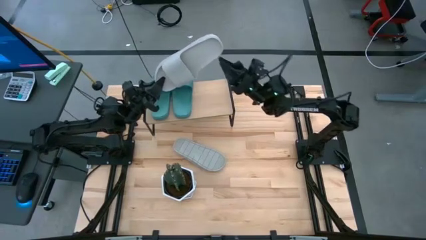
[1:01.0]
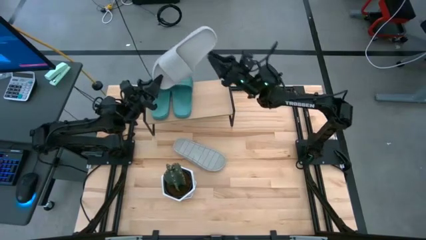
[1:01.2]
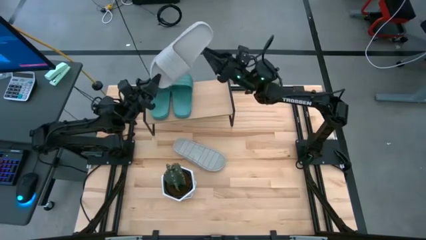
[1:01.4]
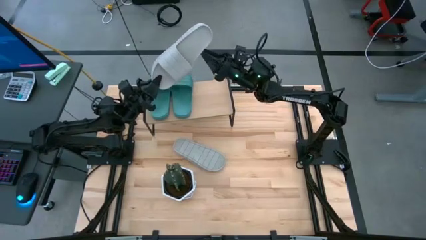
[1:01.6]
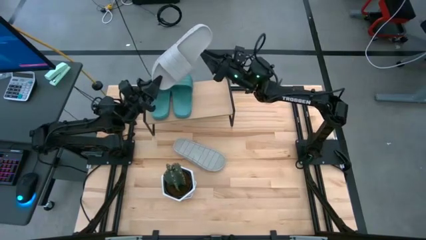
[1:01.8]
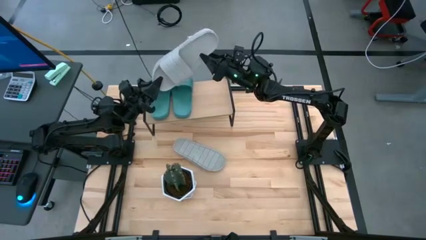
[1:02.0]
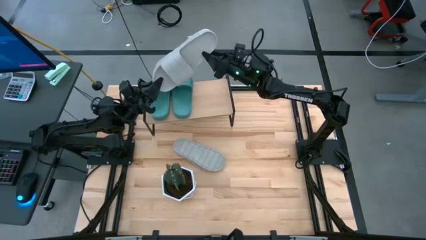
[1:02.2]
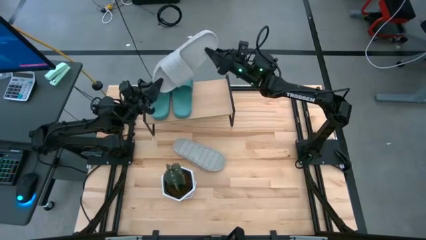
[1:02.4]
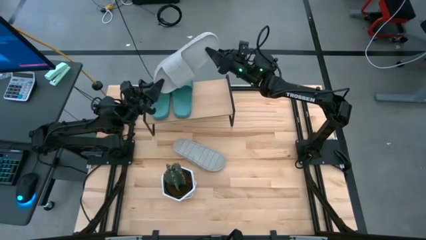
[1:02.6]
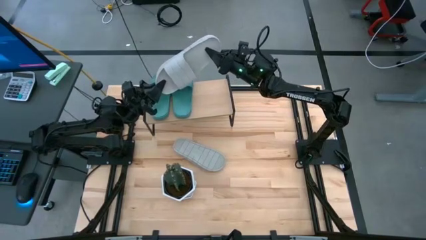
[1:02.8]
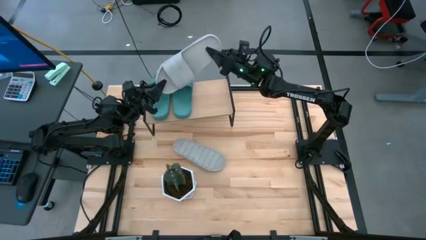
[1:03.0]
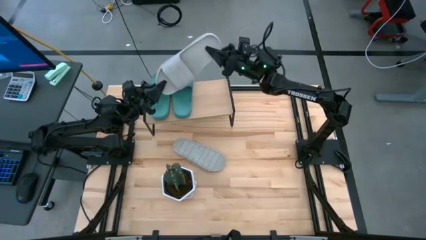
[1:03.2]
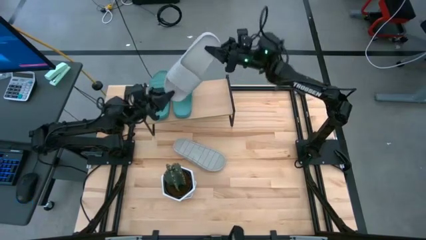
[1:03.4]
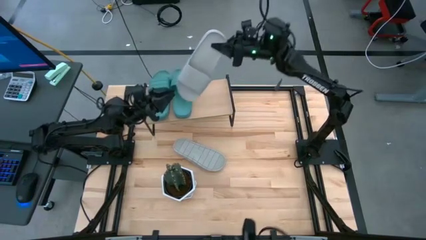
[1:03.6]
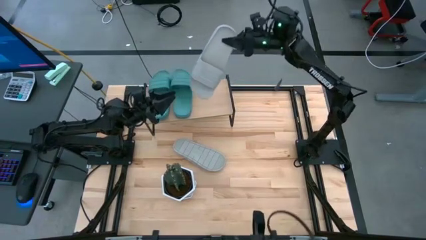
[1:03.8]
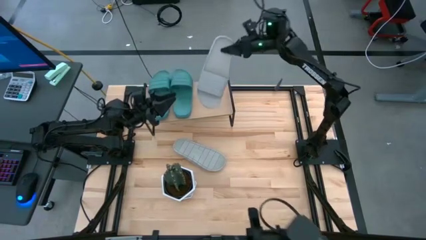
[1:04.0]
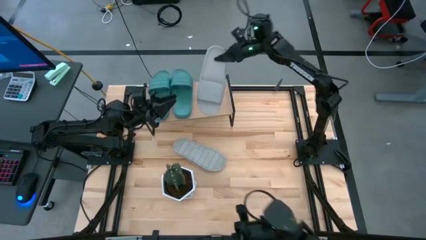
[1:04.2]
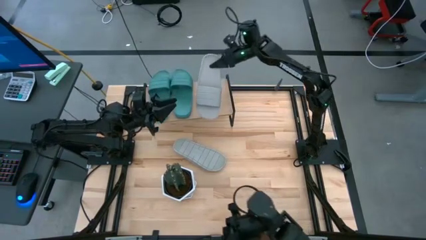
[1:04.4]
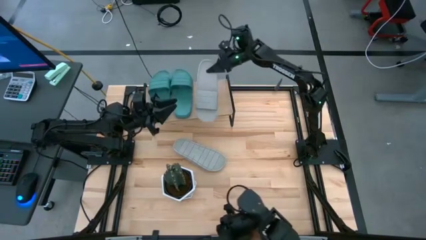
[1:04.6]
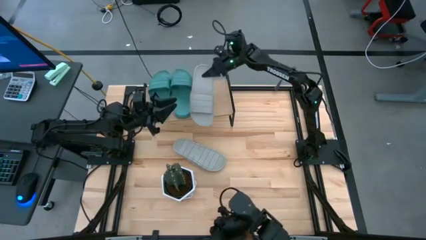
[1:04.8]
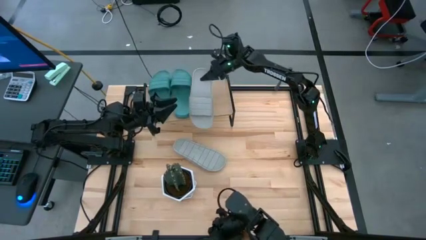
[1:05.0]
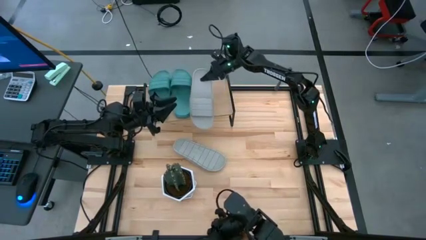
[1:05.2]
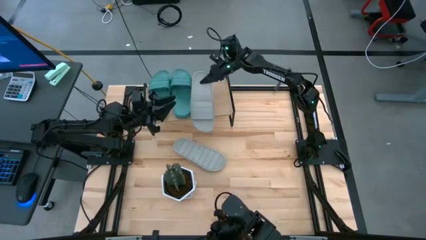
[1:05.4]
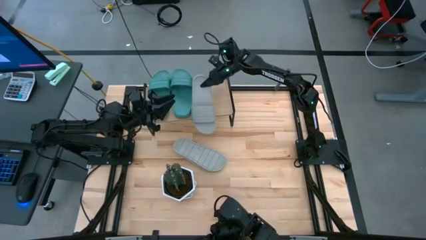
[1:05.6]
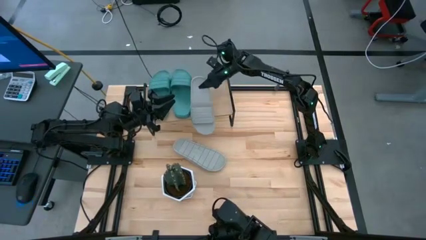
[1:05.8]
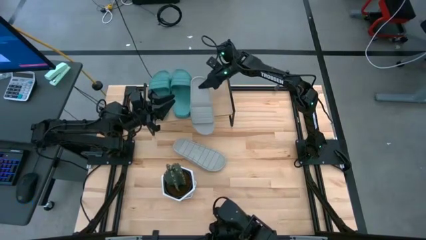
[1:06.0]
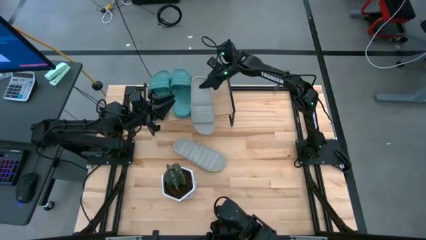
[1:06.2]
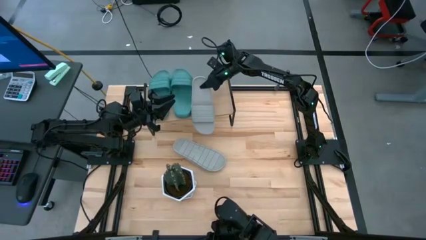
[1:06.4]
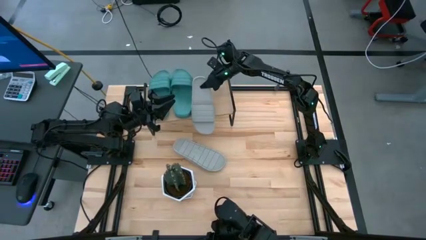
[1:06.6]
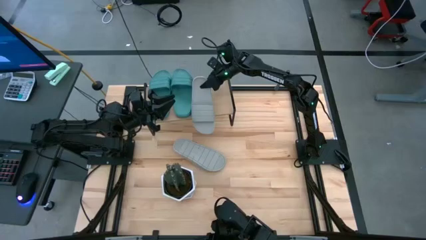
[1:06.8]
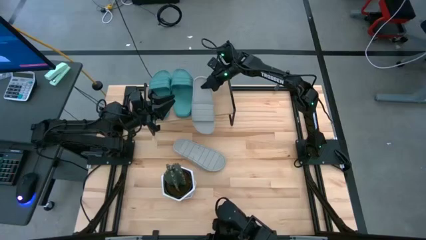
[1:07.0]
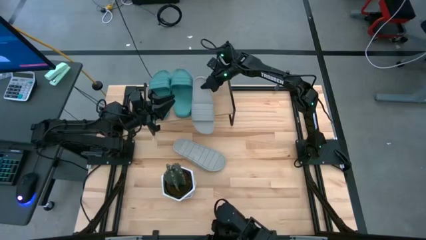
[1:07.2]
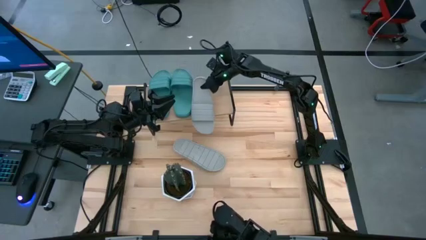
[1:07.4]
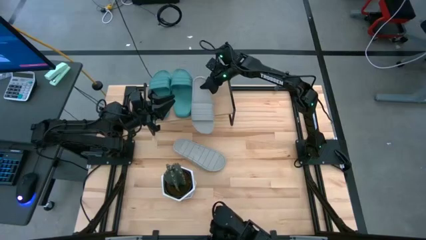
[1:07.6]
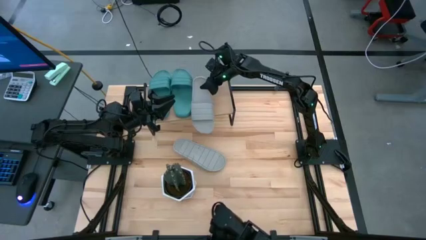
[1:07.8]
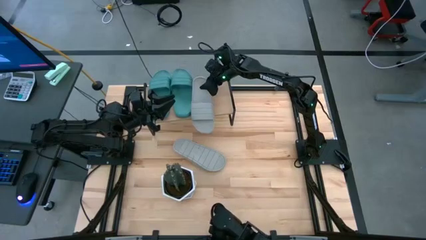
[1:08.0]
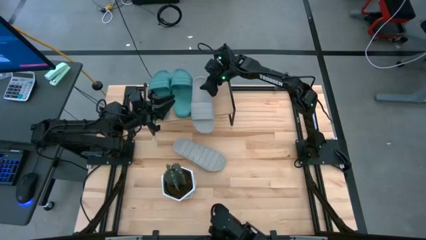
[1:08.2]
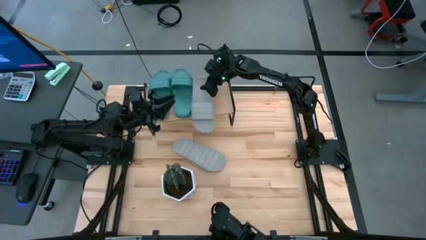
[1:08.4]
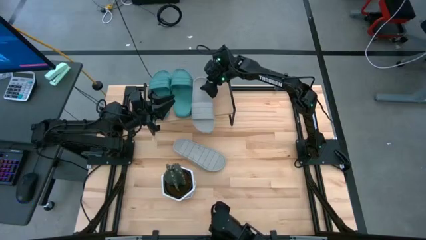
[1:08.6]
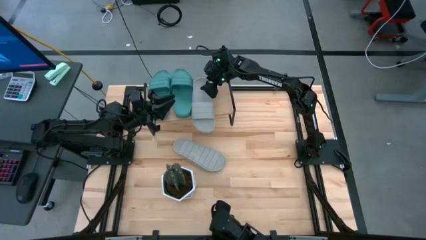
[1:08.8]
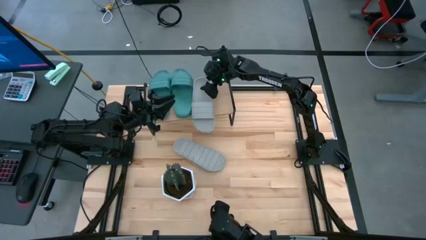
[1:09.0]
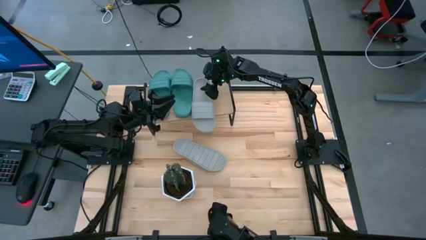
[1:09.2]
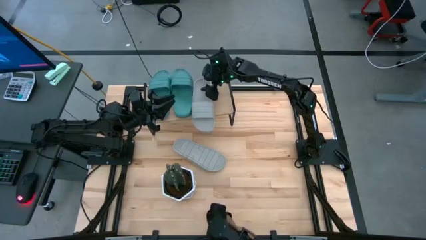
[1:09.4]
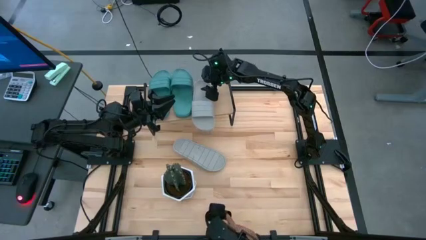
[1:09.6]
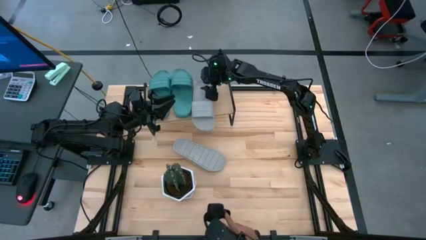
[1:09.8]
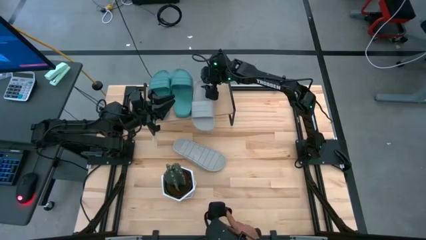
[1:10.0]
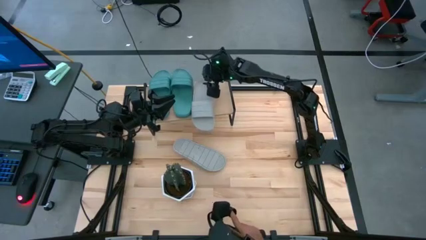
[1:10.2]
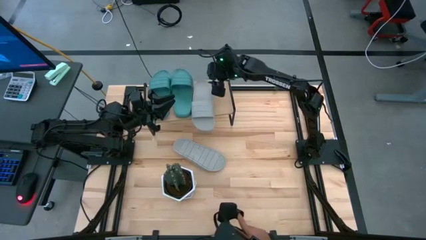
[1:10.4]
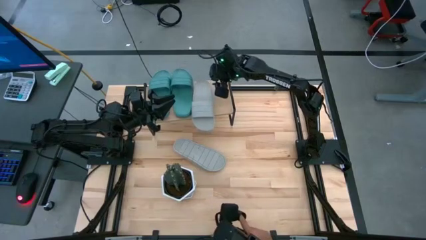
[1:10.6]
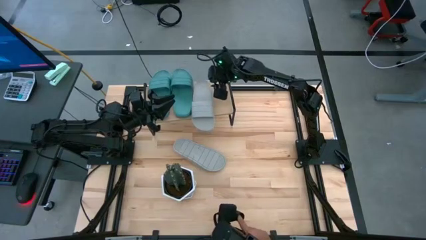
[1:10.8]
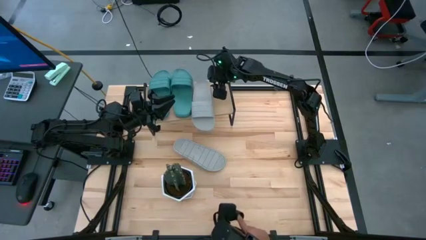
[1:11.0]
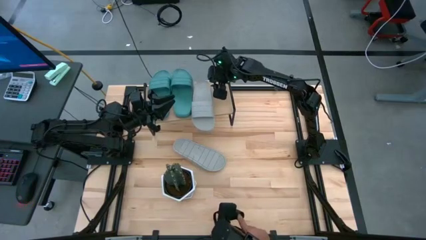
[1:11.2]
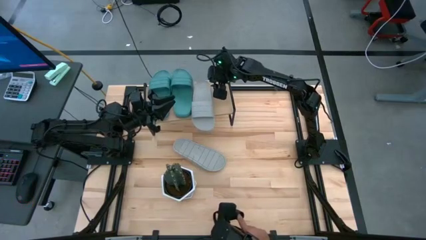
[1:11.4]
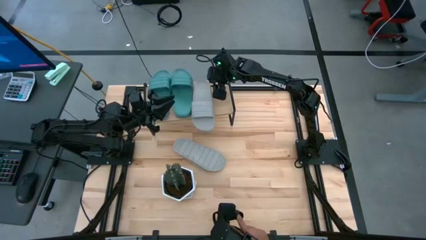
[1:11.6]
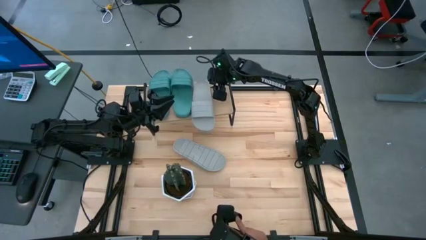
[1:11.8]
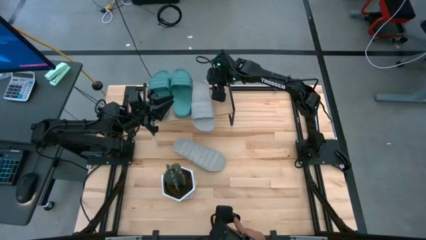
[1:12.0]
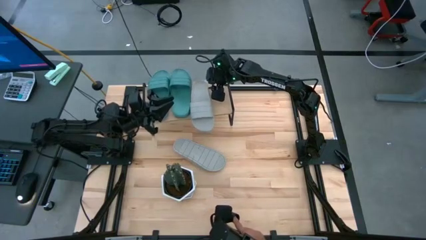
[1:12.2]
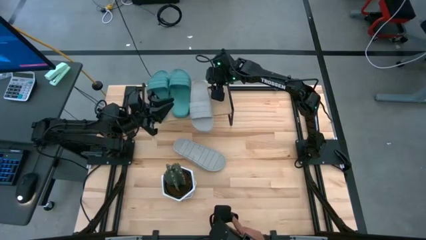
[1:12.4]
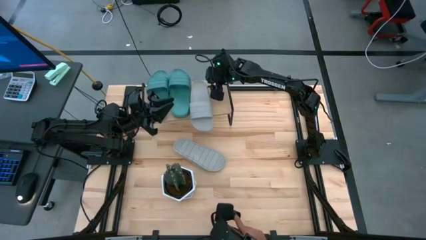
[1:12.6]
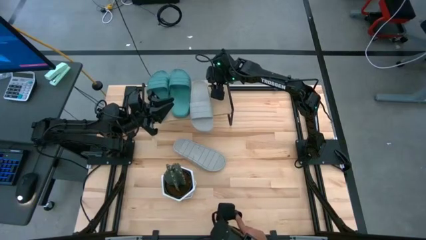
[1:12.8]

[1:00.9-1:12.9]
Task: Pick and place slides into the shelf
Put the right gray slipper on the shelf
